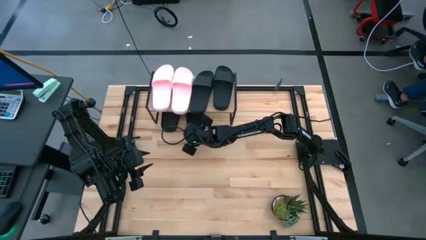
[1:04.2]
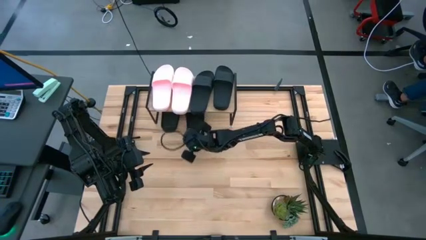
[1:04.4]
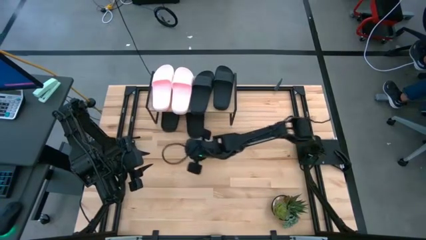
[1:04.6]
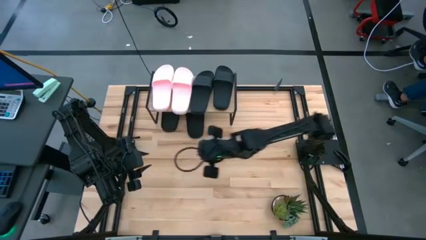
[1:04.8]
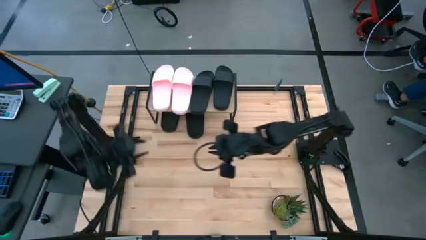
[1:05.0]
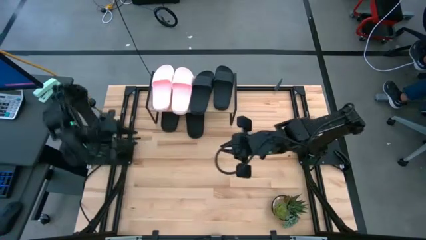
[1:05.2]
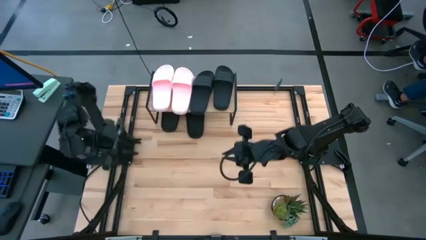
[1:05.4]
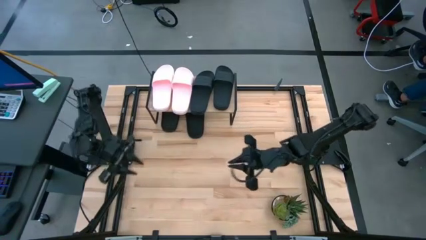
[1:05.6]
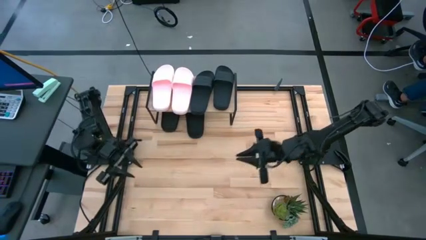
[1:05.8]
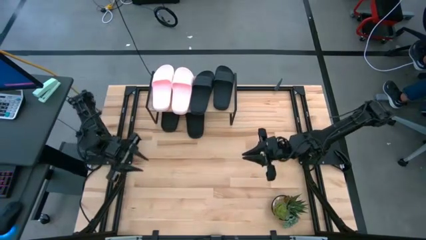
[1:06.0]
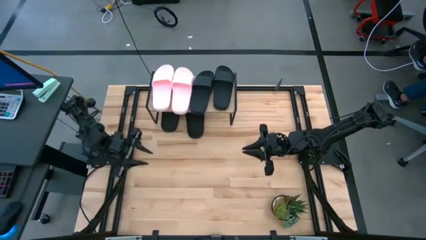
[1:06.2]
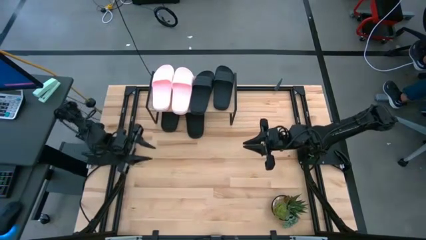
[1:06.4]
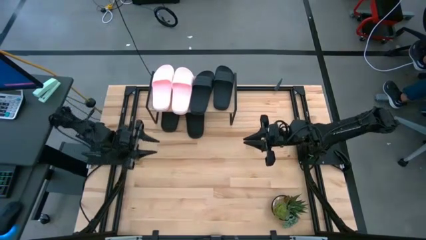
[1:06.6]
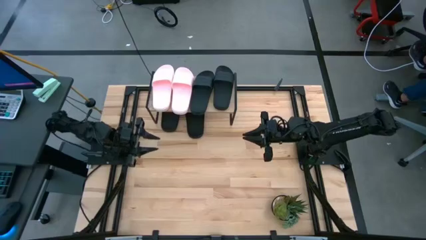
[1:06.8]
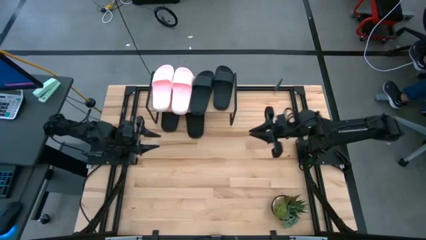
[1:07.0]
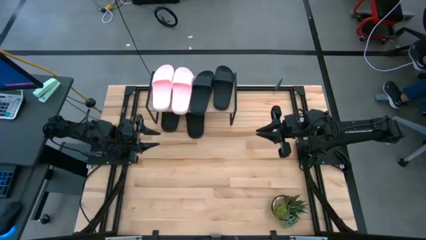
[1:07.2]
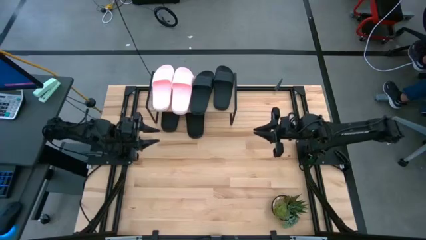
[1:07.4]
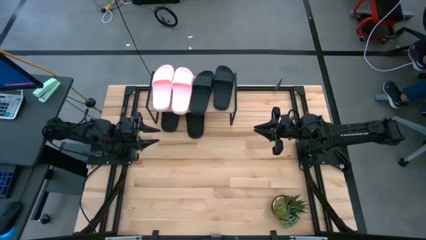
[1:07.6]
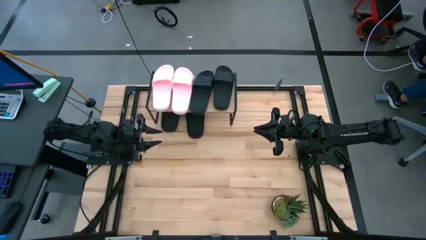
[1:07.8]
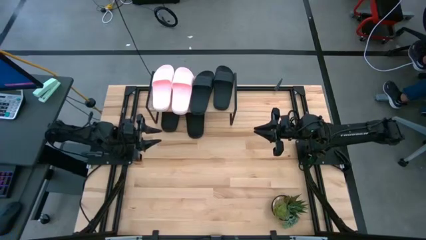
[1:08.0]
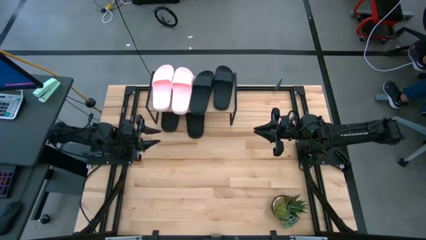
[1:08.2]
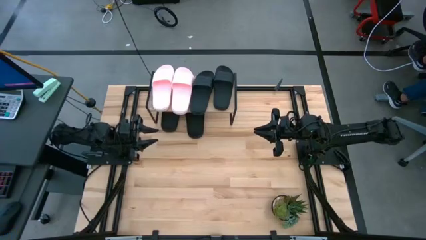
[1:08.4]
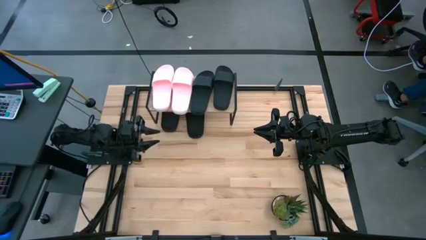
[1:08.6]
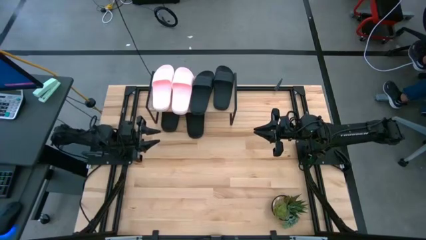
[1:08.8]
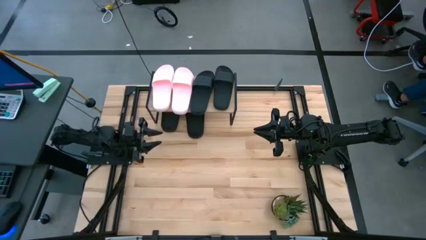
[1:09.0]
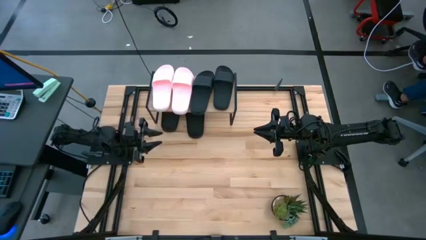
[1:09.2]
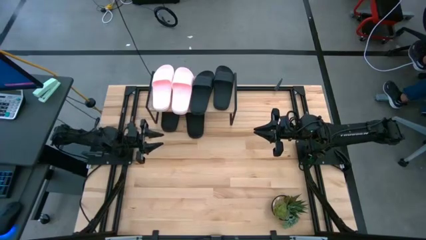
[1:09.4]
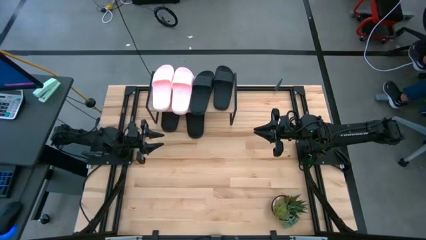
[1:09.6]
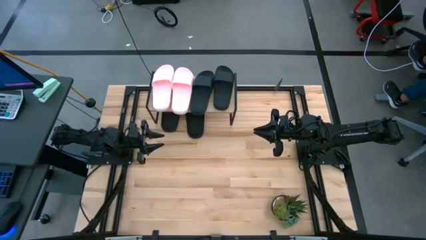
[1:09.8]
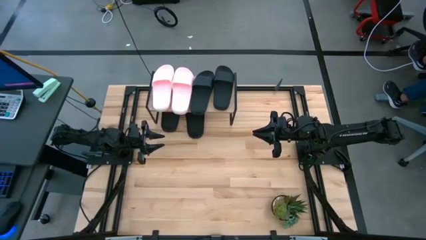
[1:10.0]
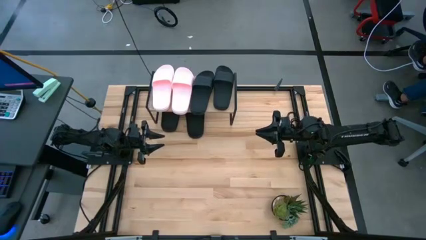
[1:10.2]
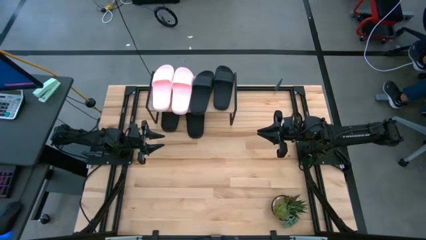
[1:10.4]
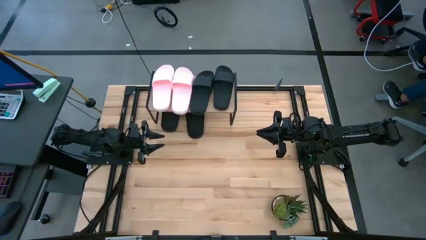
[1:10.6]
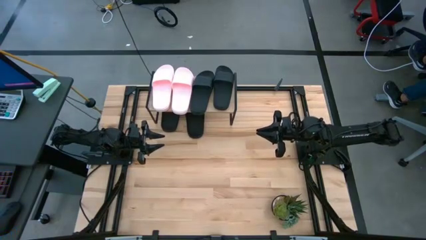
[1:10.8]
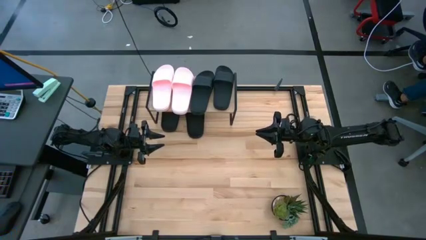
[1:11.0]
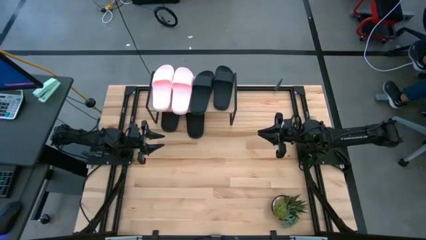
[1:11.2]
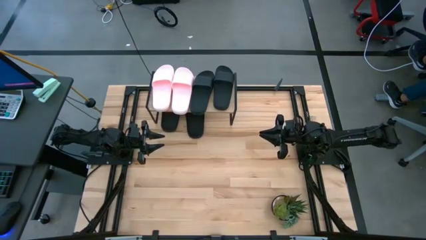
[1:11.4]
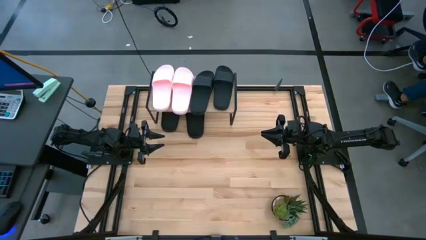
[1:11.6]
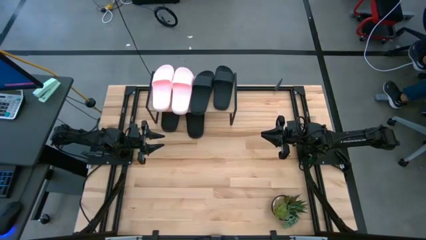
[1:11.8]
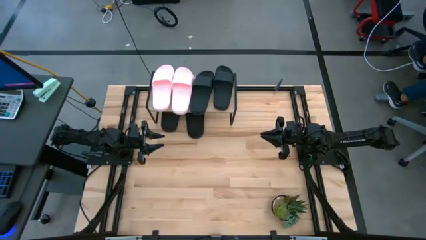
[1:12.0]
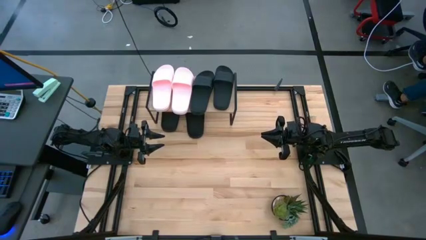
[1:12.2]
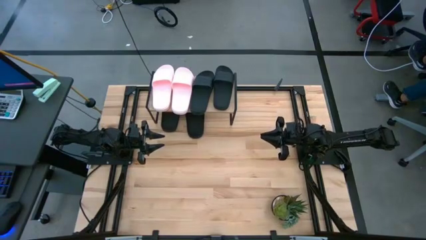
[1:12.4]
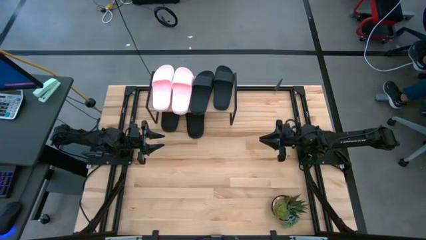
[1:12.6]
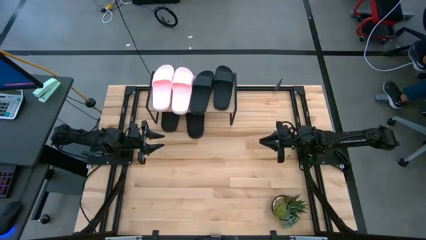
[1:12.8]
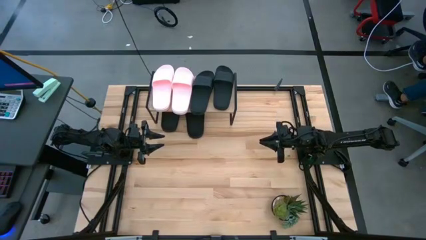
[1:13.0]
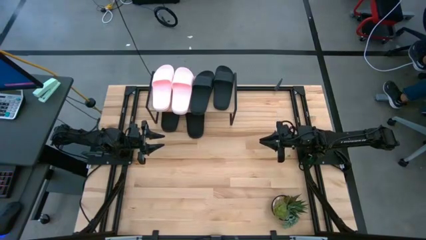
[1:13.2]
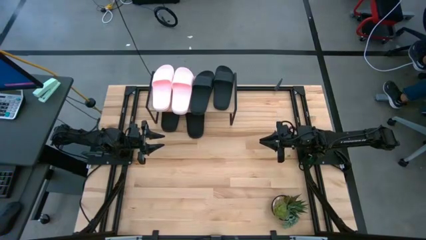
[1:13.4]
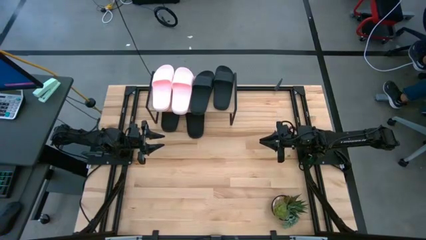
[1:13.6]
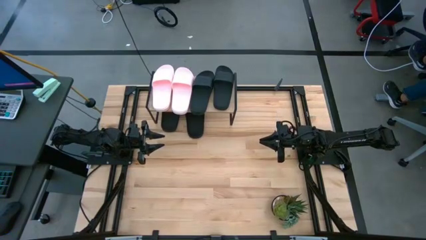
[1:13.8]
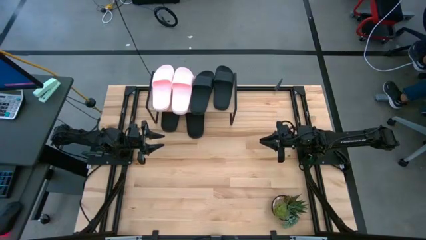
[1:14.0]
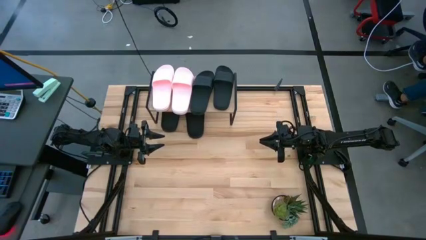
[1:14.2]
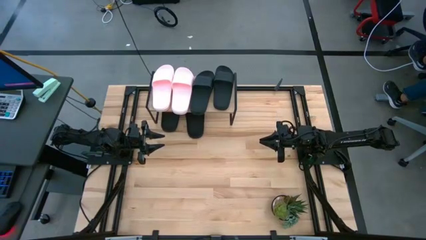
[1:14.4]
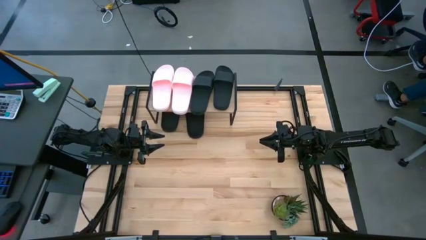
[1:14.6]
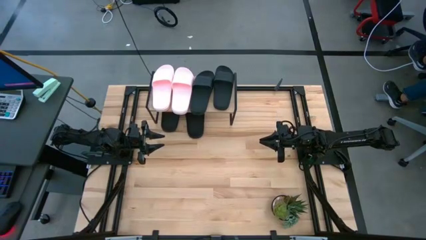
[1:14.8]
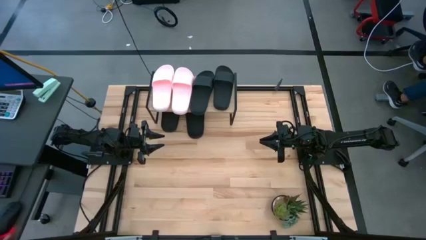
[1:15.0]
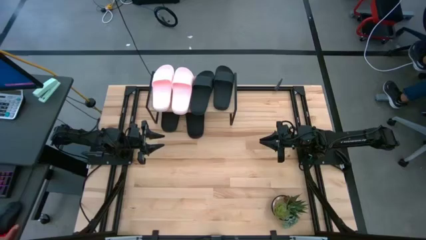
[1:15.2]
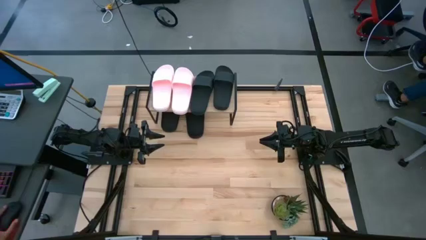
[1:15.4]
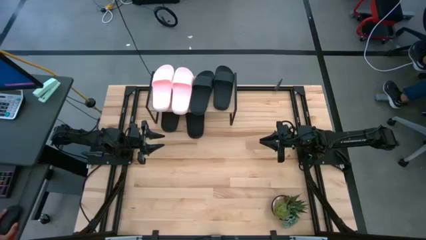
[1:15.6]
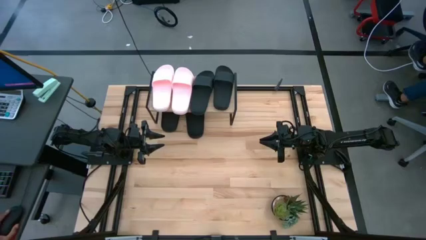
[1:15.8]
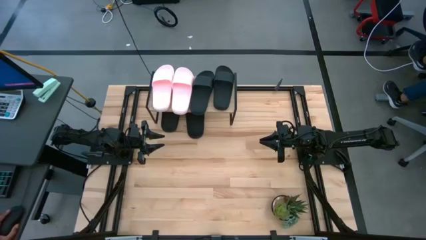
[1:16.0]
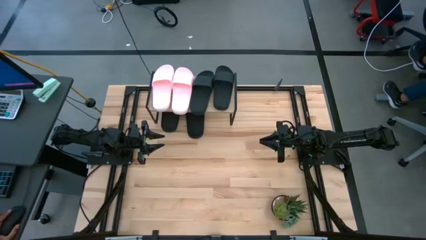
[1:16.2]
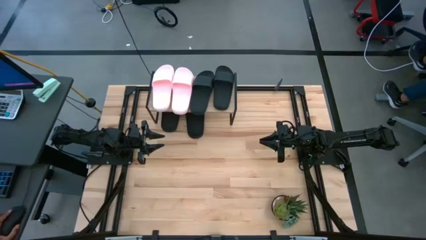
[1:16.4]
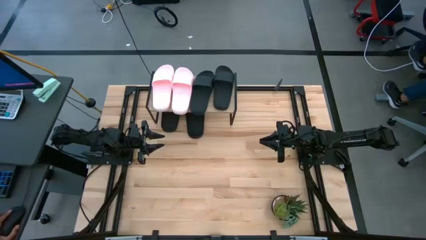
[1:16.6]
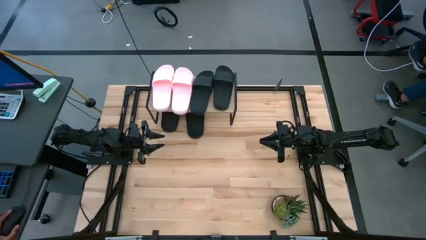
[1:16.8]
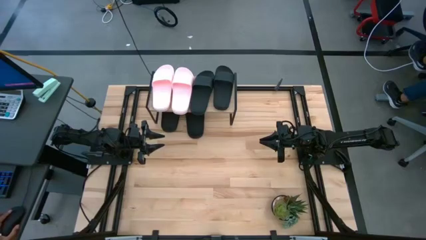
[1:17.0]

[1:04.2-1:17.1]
Task: Pick and place slides into the shelf
Return to Home Position
